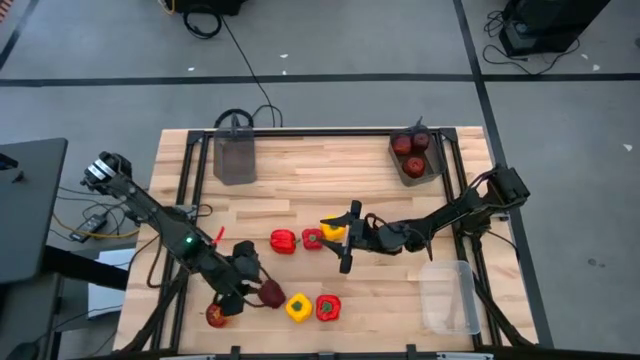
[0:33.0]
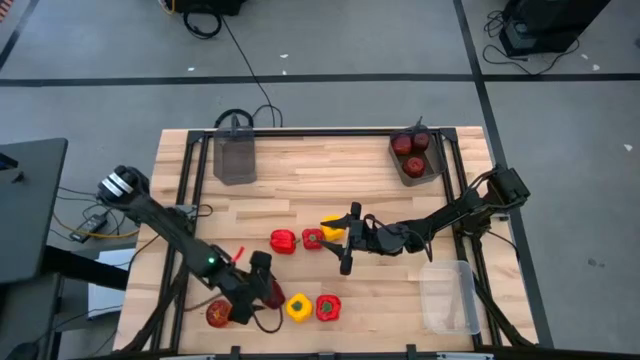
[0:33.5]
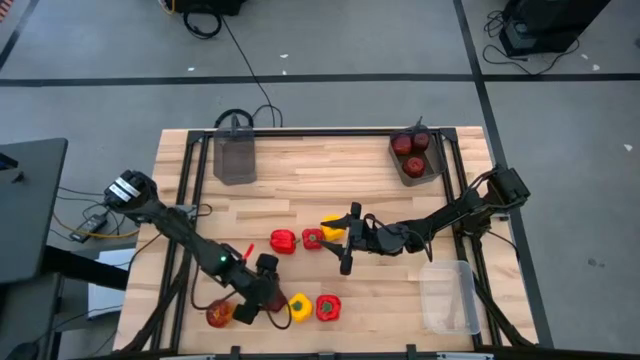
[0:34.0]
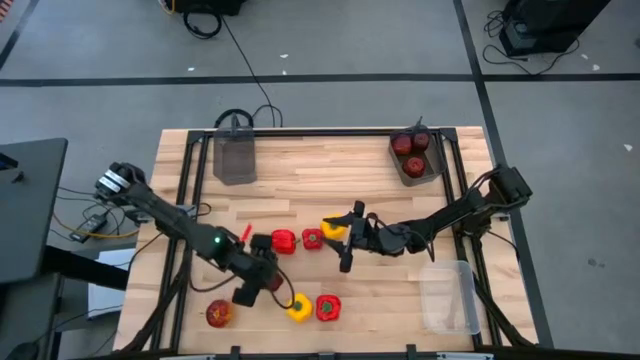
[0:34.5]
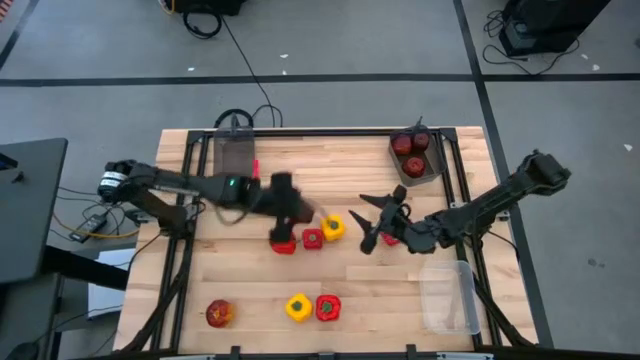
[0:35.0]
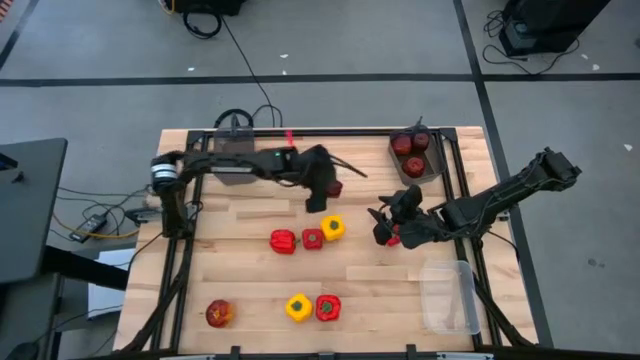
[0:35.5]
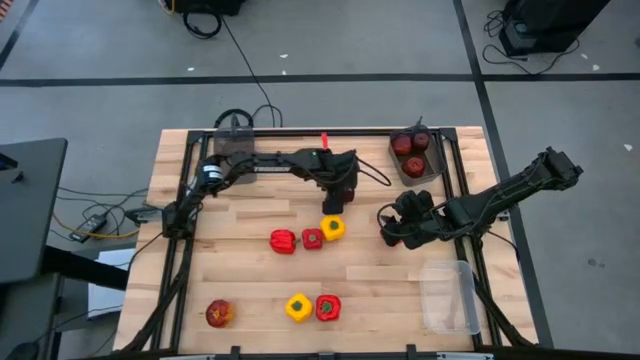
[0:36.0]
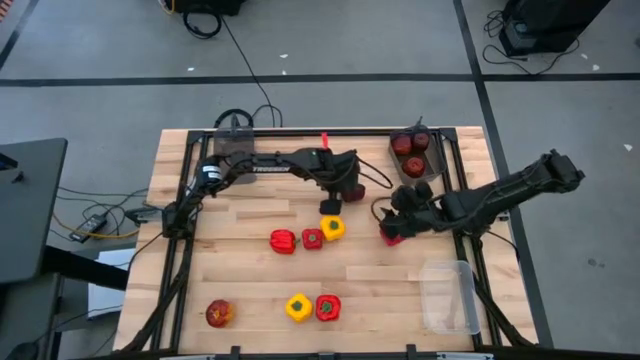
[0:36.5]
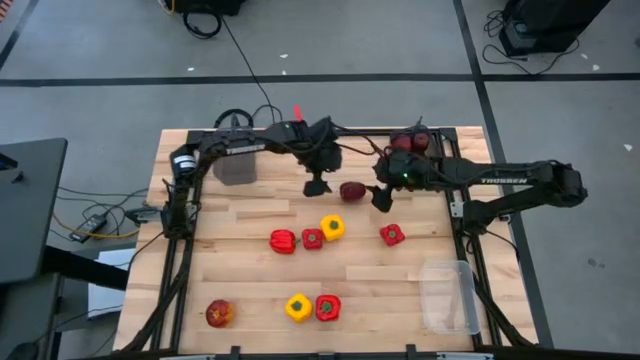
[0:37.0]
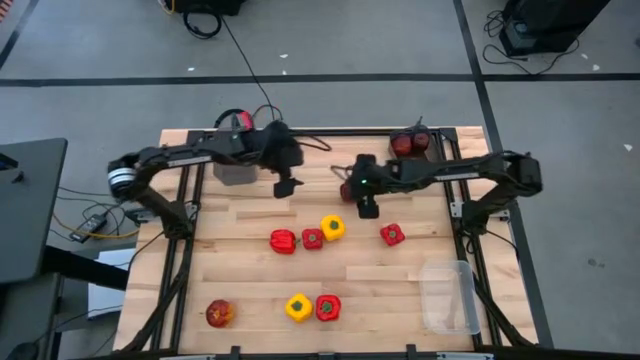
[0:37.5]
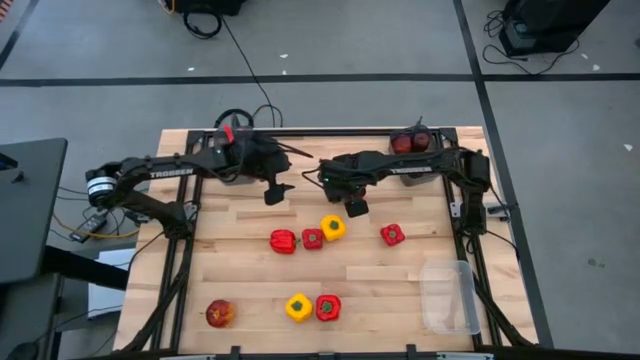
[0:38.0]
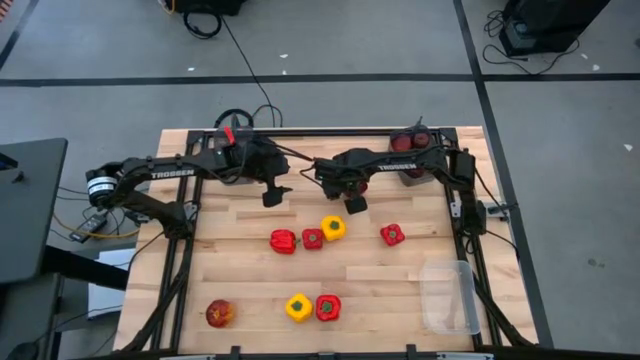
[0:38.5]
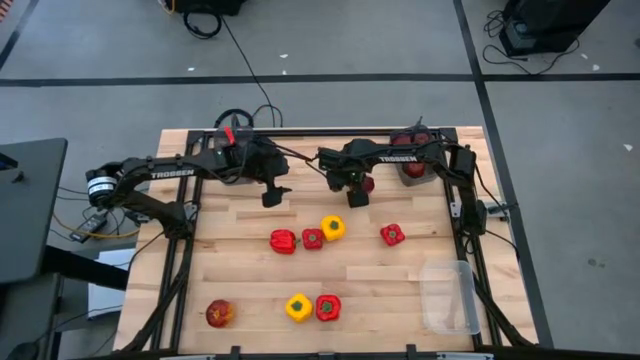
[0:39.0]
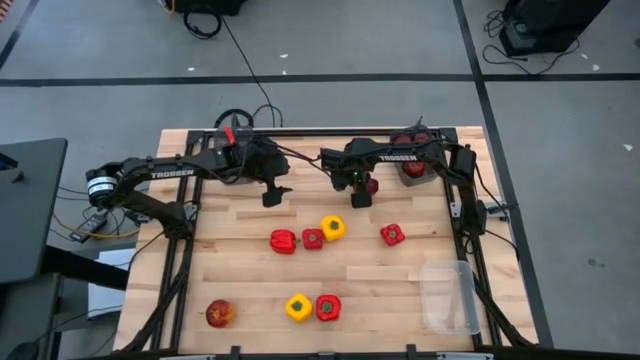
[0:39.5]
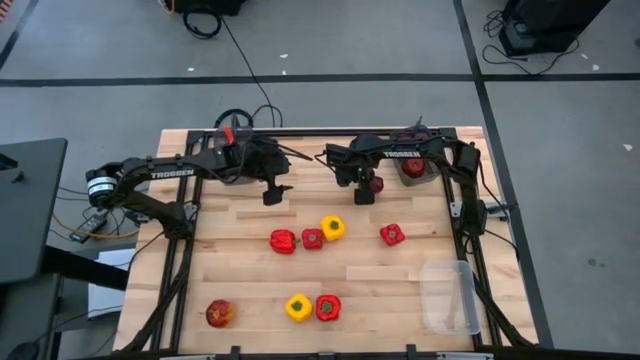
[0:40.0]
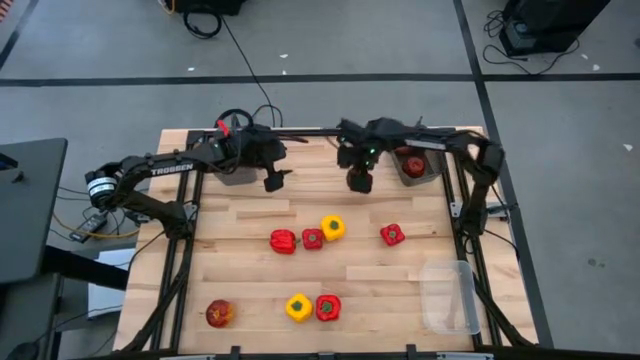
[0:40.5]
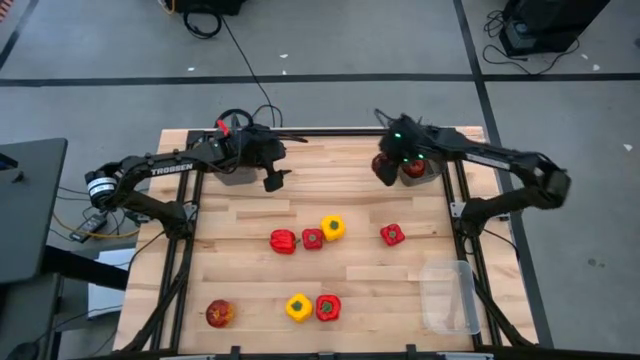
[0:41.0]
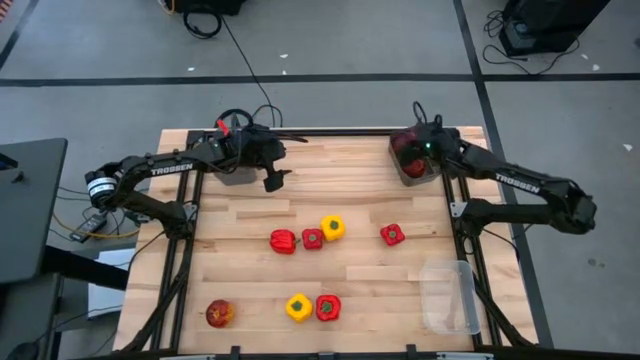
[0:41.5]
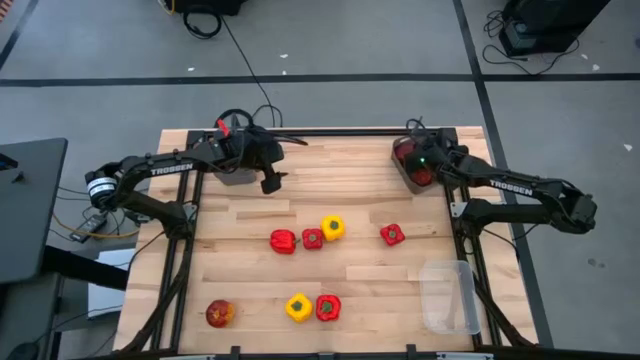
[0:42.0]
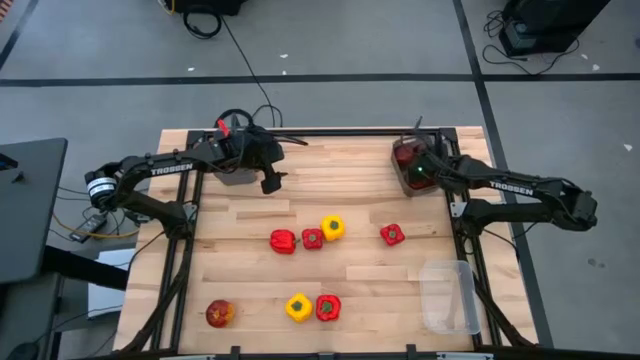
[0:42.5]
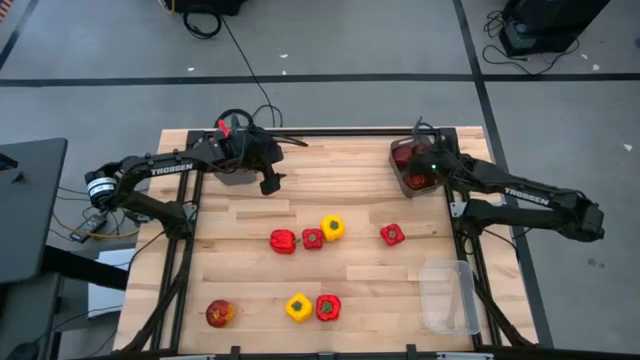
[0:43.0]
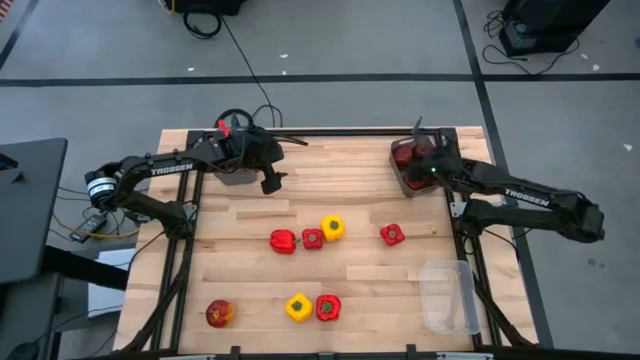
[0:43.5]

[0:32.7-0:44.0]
Task: Sort produce into baskets
Put the right apple into the right dark gray bin

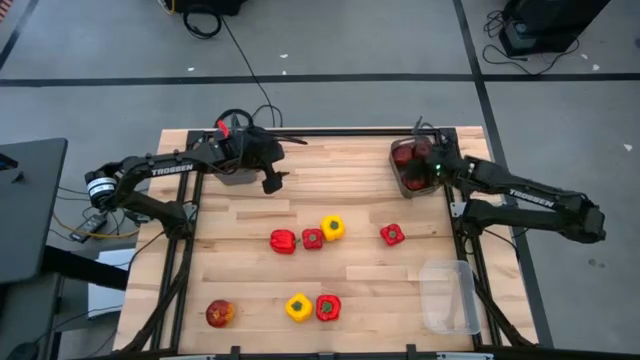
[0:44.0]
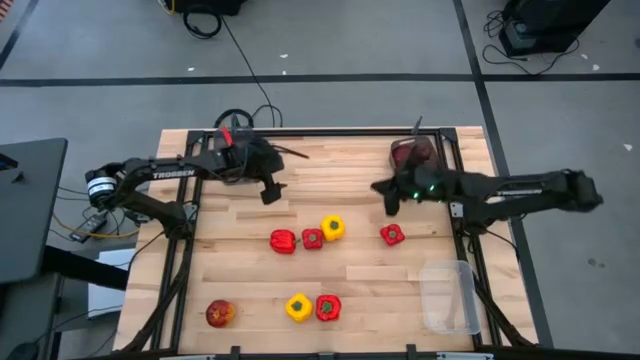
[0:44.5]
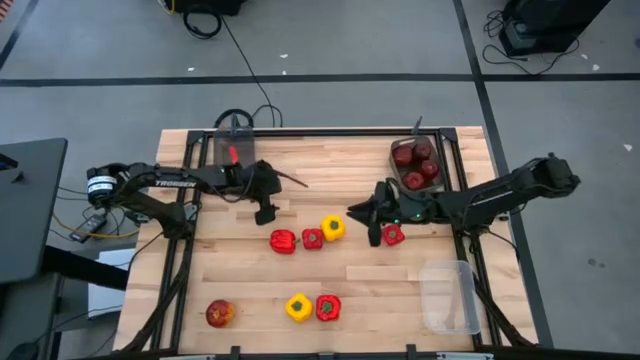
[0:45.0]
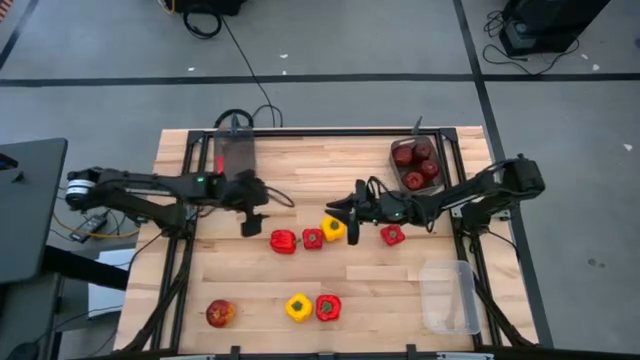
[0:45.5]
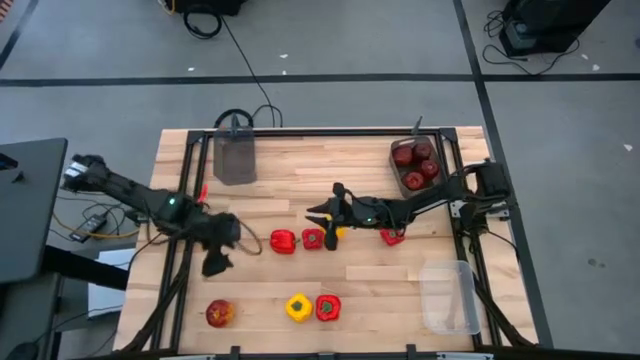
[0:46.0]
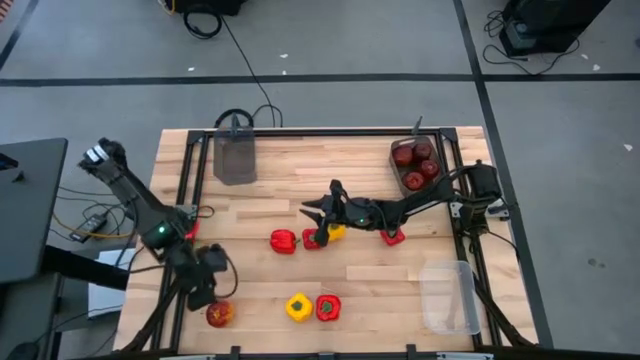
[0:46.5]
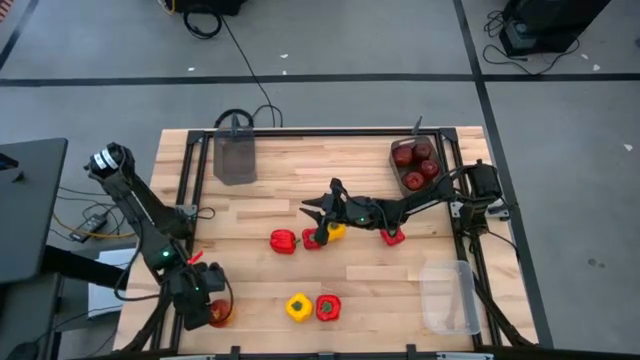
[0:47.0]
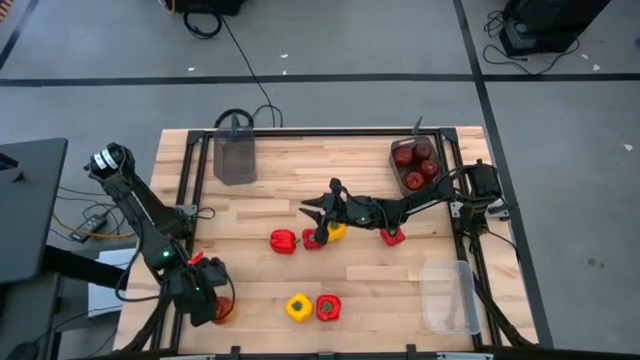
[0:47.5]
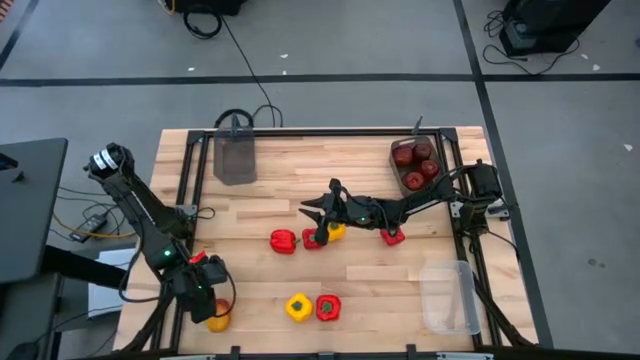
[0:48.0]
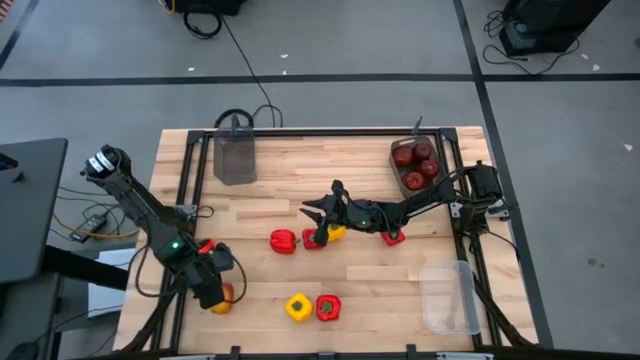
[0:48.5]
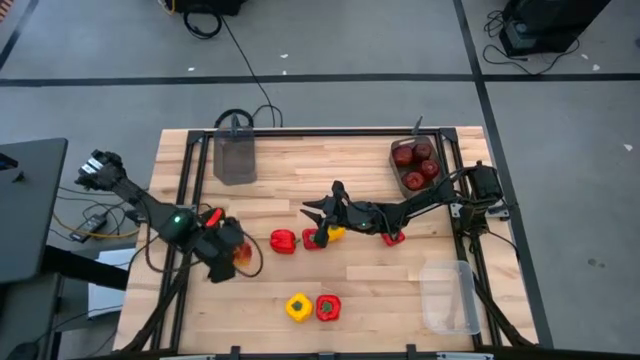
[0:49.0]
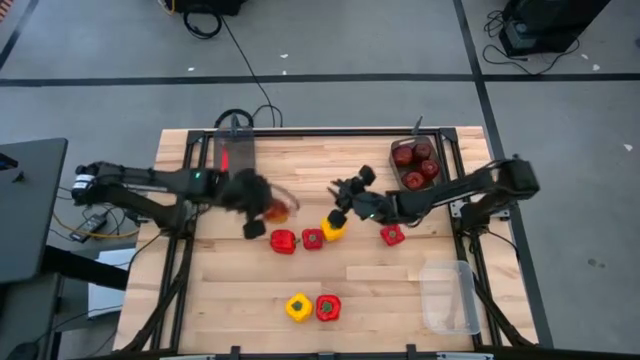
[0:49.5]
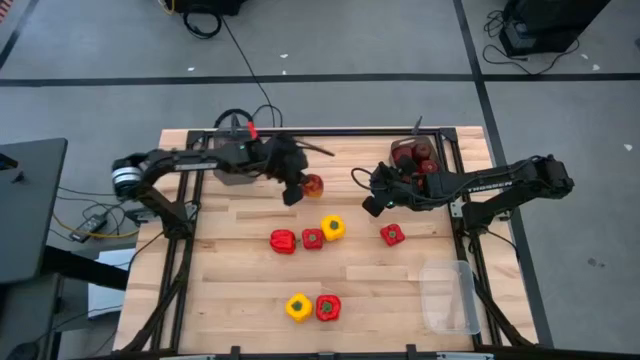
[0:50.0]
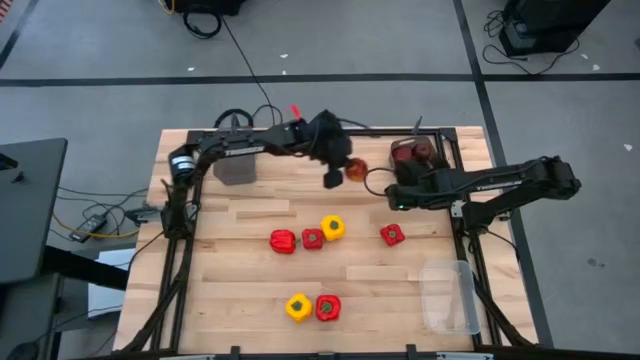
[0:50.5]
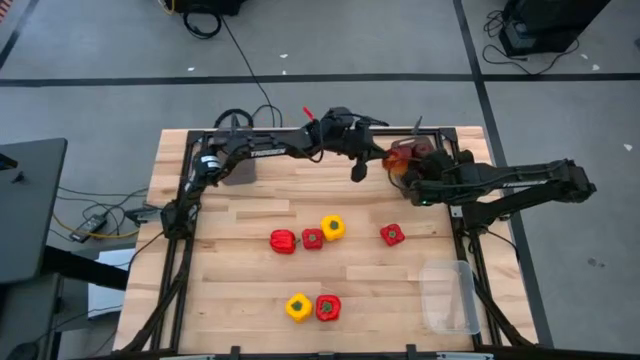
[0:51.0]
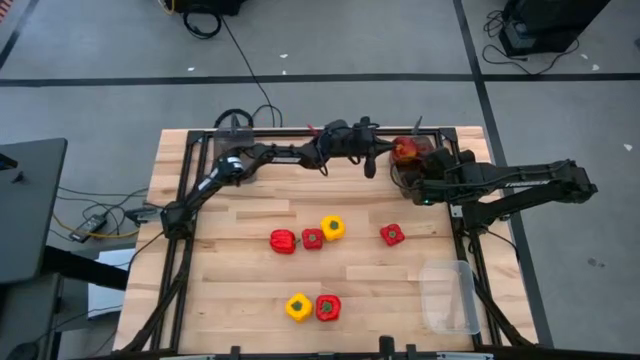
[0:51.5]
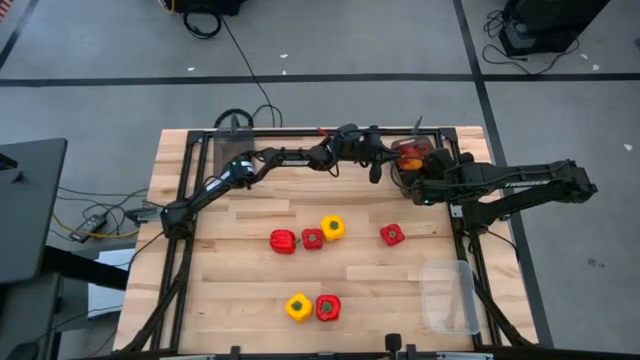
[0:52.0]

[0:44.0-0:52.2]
Put the apple into the right dark gray bin

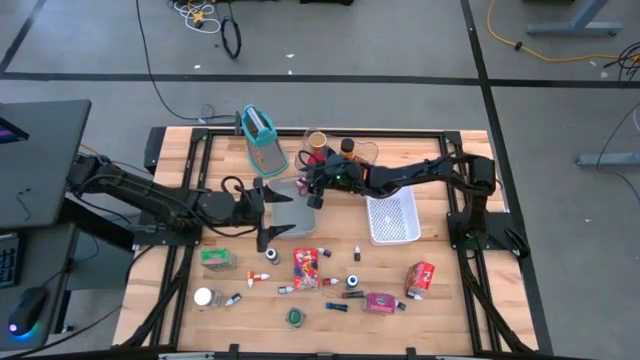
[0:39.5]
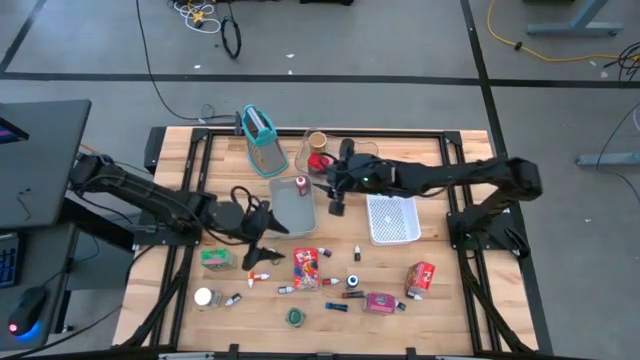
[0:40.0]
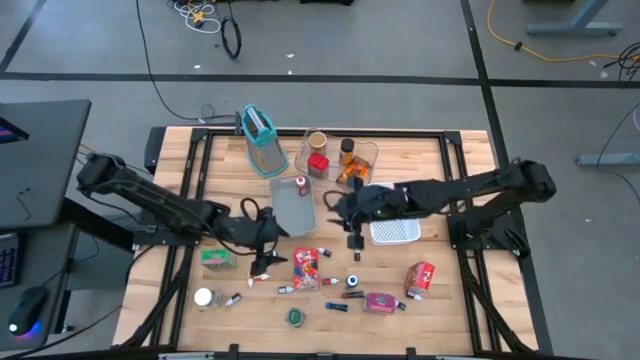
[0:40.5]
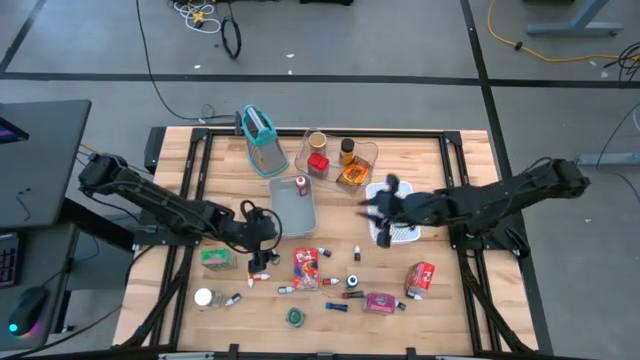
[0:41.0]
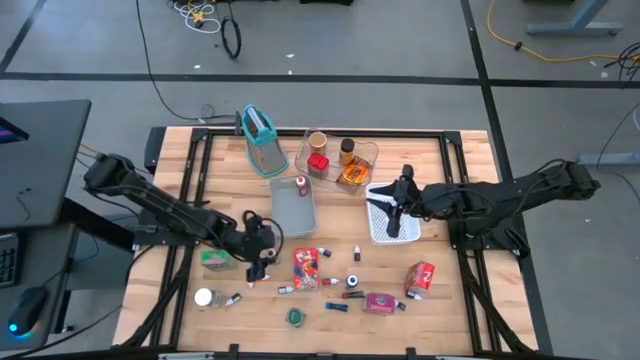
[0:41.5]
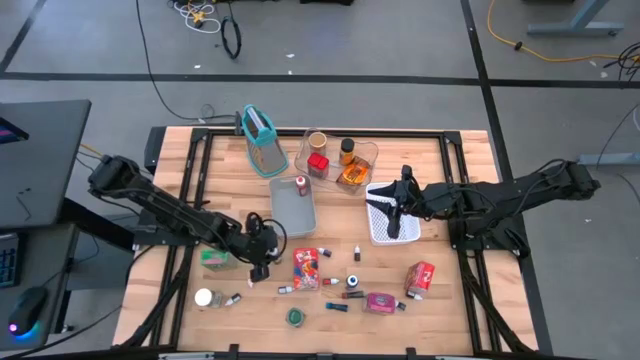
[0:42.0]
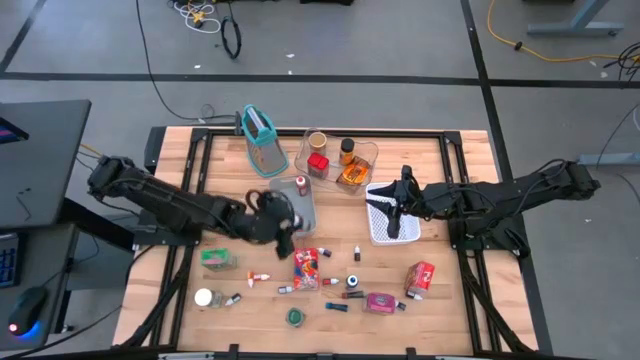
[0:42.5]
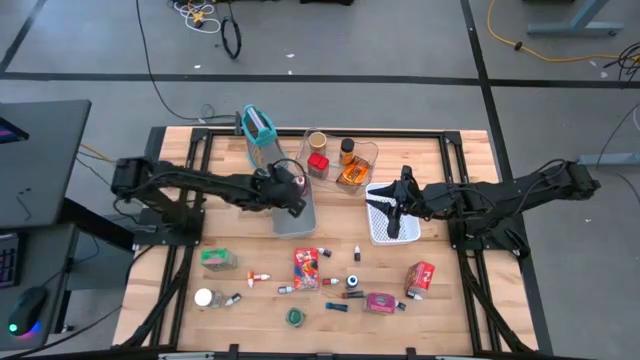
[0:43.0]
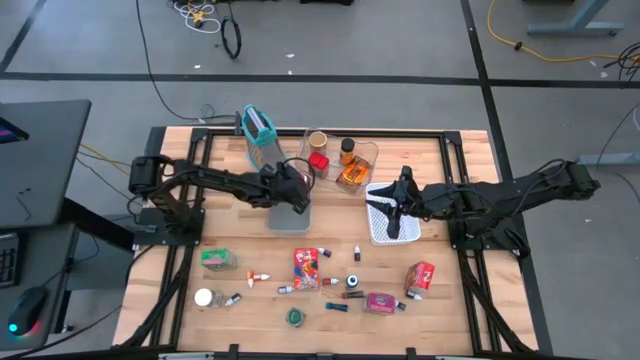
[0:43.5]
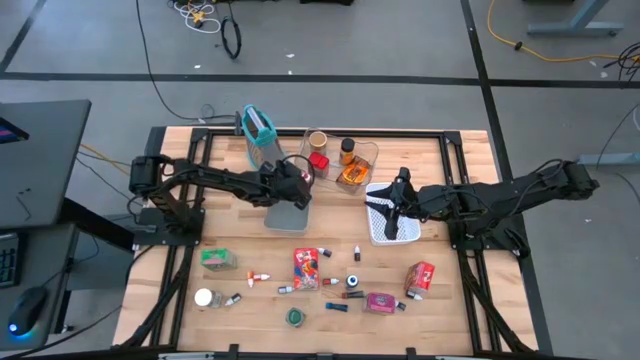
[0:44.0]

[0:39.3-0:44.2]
Task: Pick & Place Kitchen Items
Put the large black food coloring bottle into the gray bin
